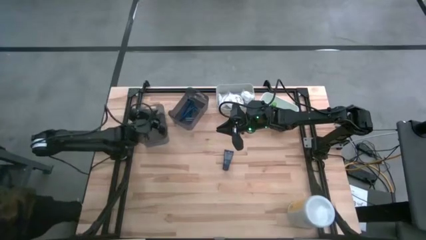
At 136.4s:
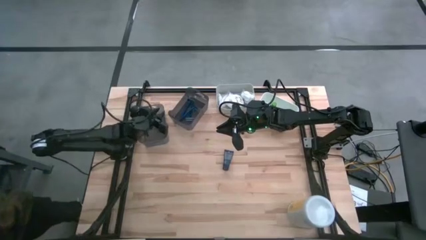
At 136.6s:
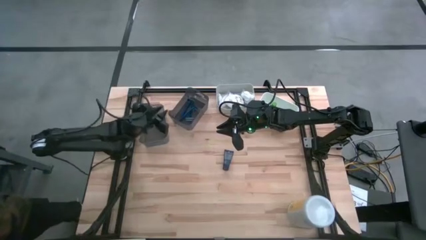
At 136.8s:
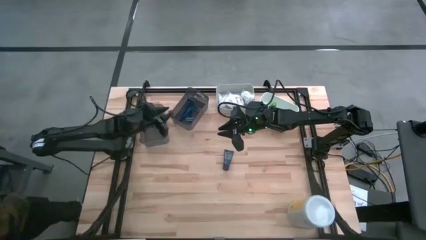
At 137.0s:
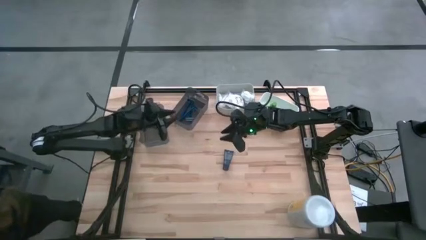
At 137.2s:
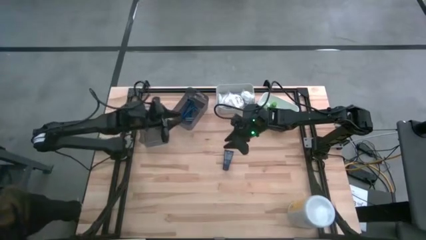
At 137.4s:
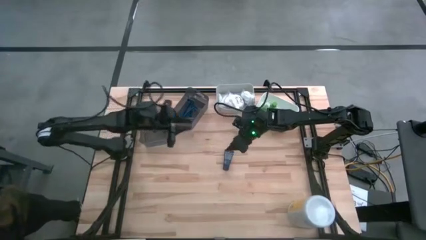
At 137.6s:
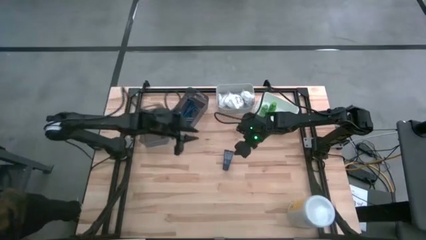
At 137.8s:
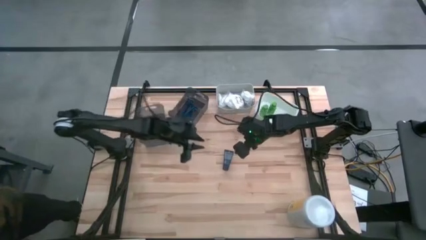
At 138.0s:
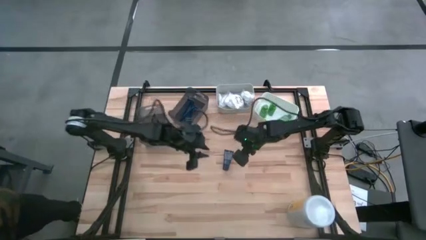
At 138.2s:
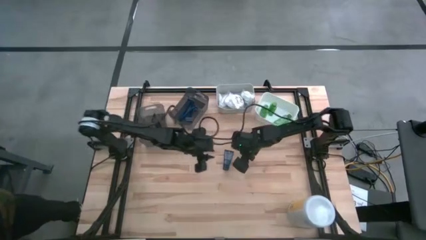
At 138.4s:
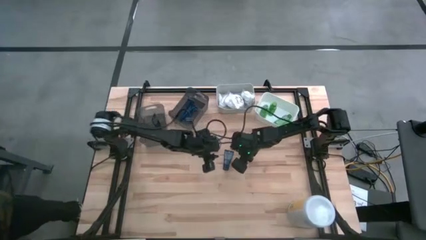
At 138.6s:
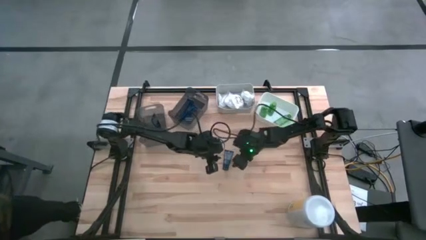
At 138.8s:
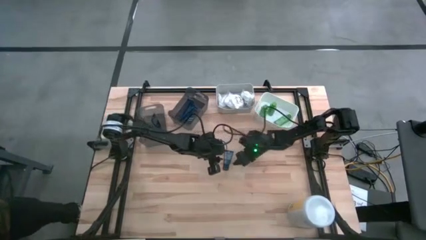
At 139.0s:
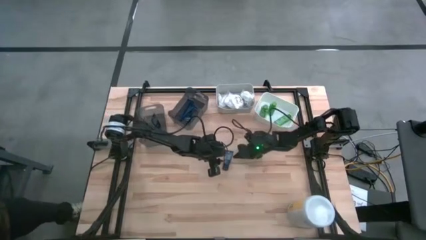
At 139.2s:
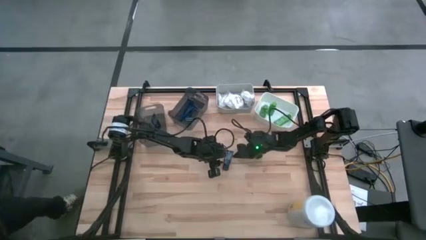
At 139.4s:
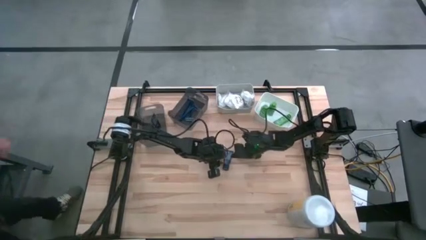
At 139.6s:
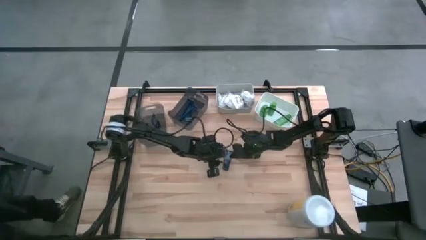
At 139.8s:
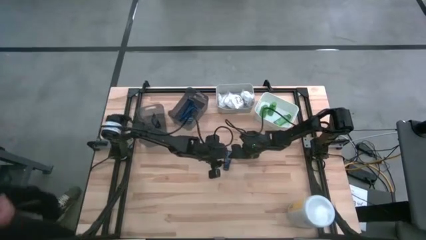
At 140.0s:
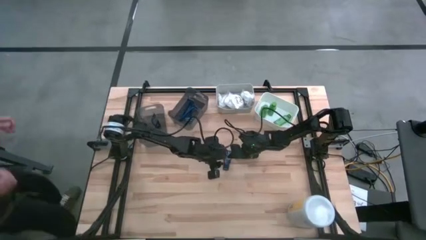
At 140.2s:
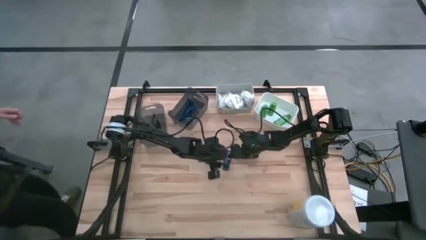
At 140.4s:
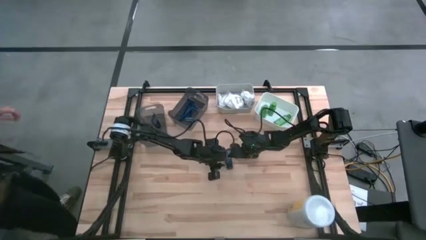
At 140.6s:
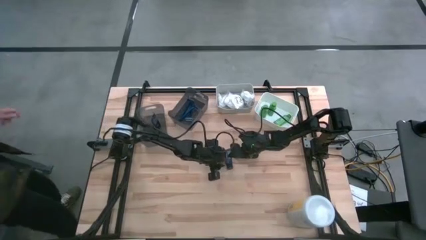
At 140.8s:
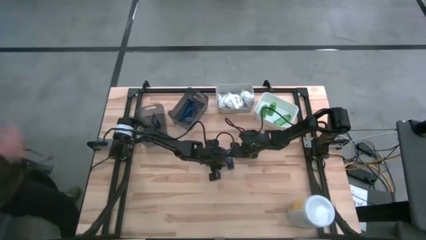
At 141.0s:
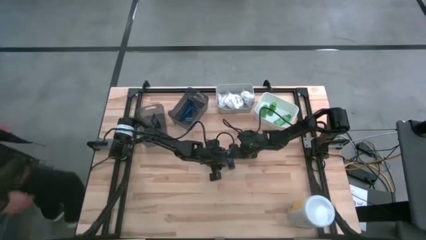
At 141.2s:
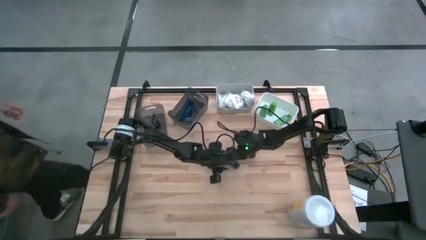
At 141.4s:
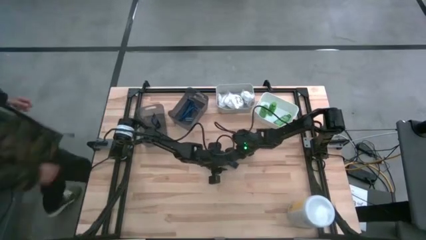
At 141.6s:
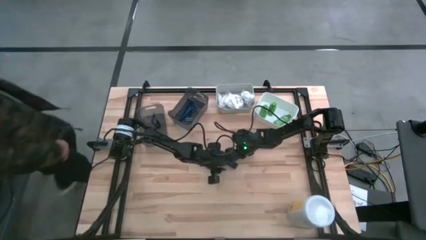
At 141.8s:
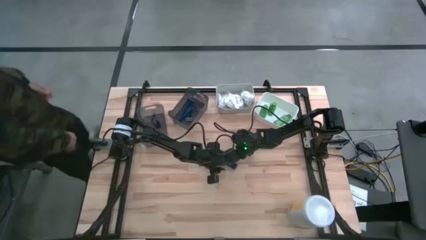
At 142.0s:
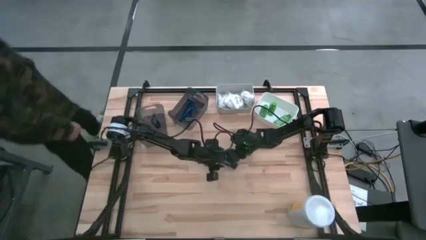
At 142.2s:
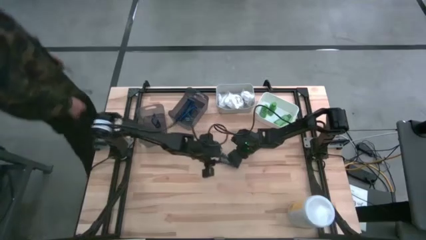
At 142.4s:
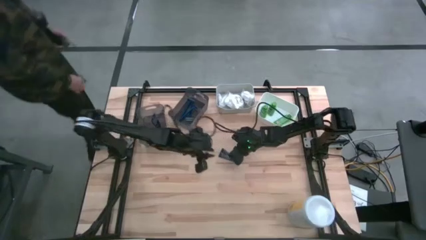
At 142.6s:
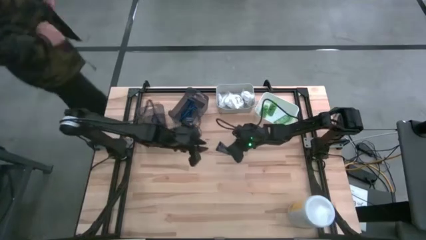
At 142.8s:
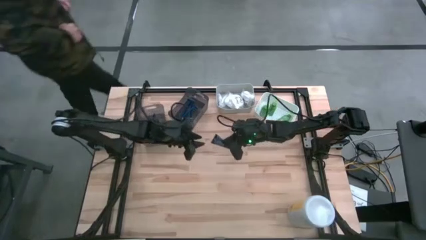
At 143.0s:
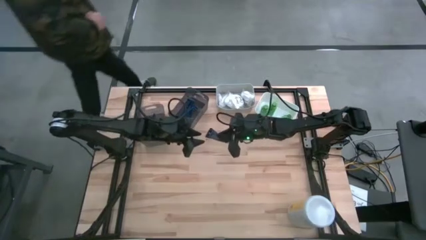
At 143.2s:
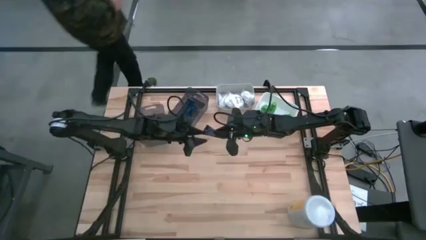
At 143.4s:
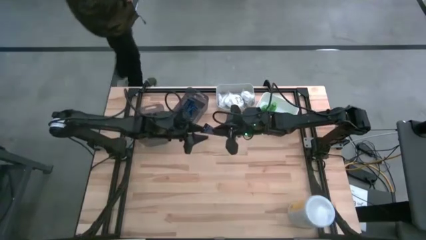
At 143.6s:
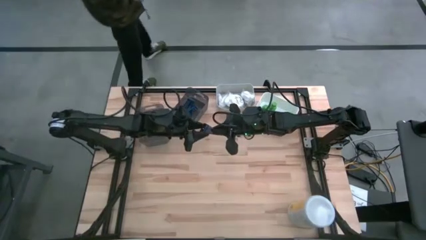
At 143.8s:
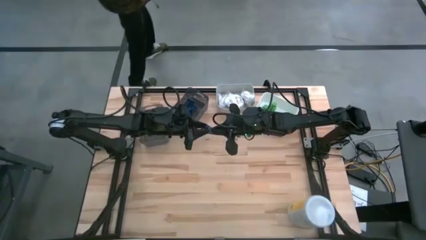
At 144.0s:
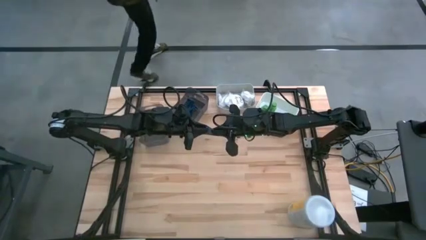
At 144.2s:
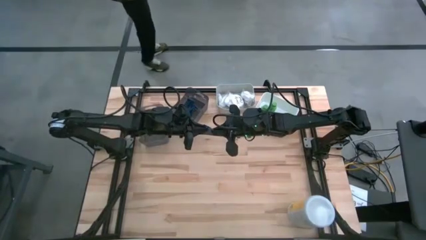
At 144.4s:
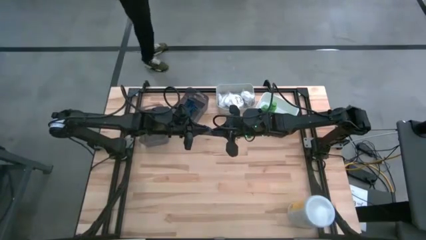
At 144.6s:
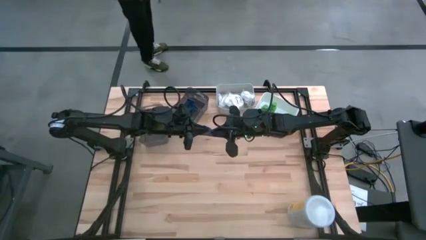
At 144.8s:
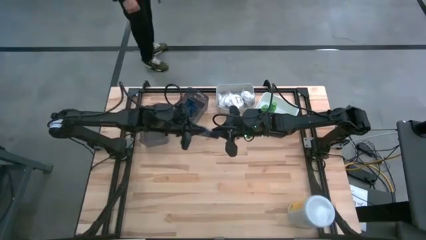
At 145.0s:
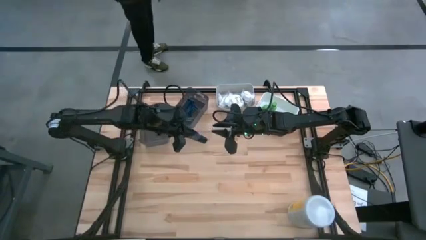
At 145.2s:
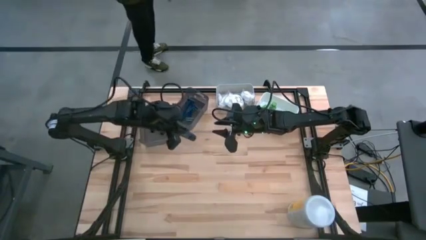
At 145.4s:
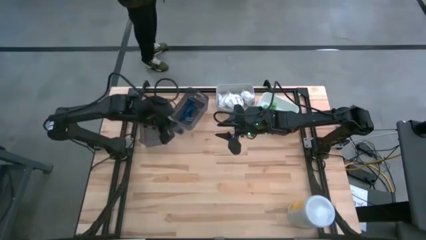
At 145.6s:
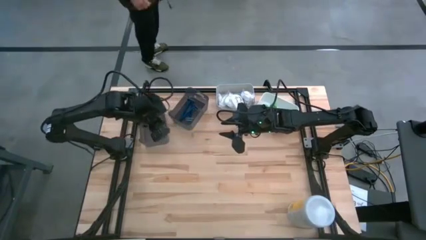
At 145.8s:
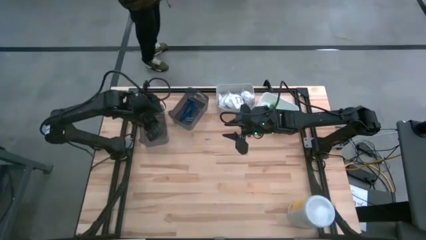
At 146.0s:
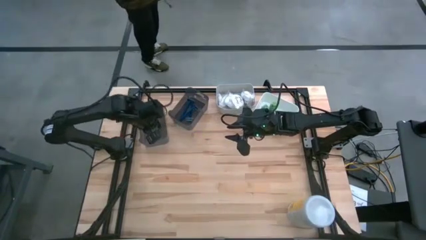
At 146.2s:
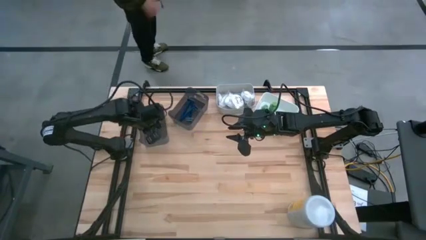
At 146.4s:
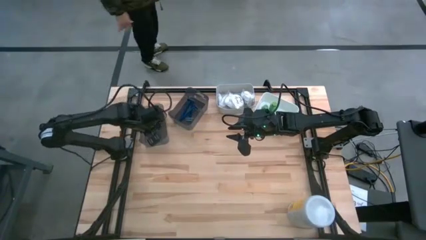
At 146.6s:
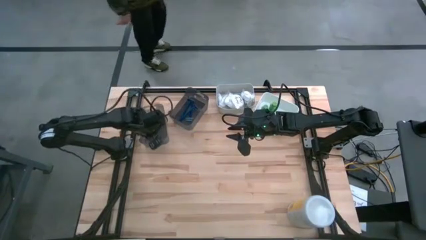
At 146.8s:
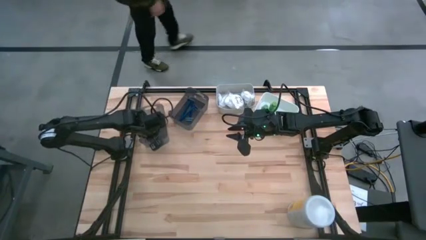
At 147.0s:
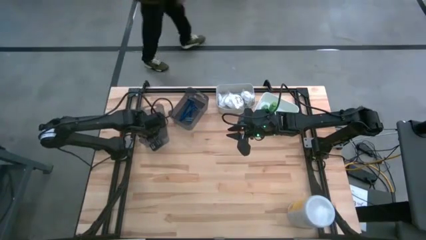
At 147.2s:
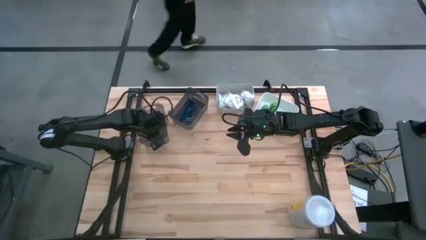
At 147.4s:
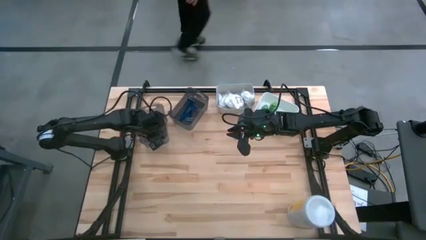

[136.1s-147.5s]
Task: Pick & Place Travel size toiletries
Put the shaving cream into the left black bin

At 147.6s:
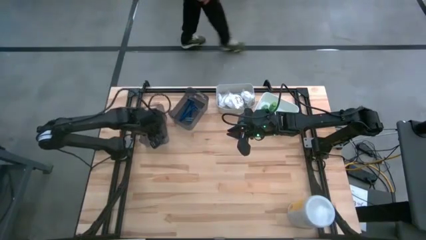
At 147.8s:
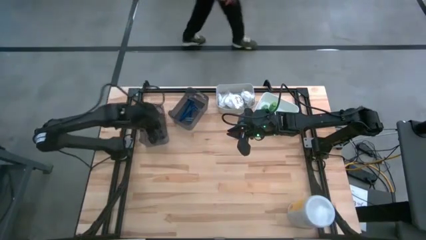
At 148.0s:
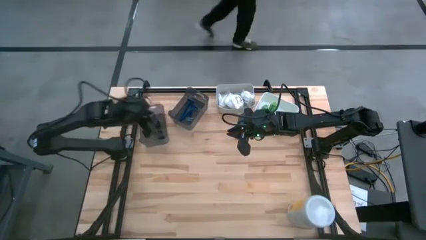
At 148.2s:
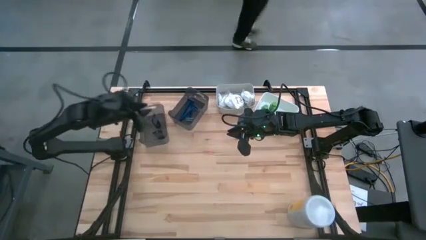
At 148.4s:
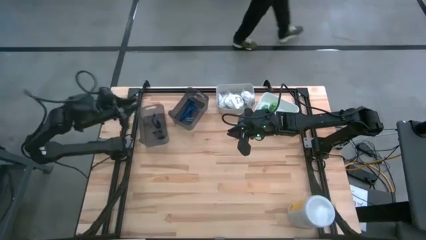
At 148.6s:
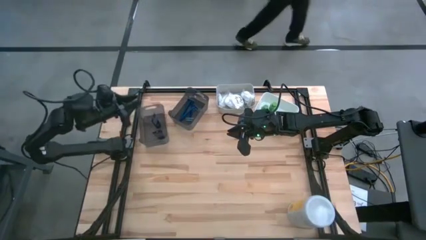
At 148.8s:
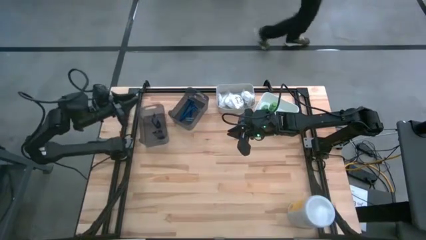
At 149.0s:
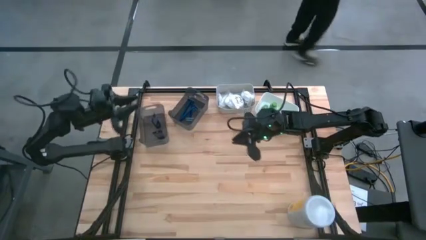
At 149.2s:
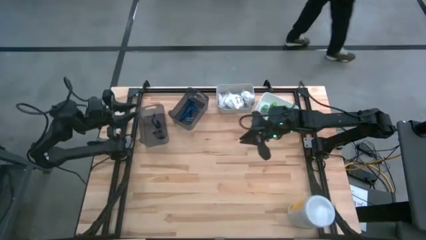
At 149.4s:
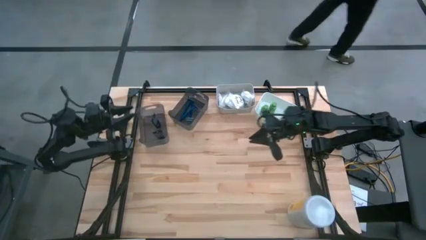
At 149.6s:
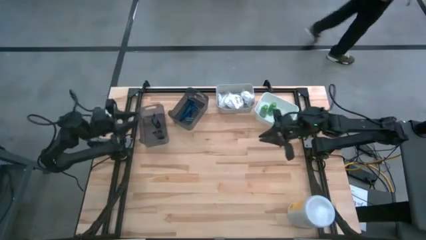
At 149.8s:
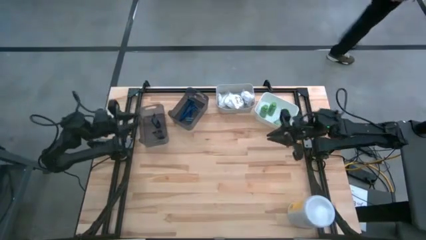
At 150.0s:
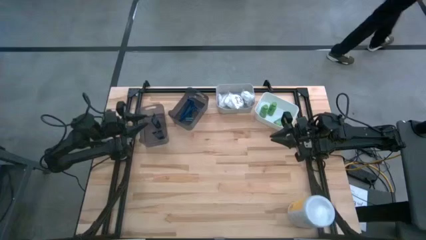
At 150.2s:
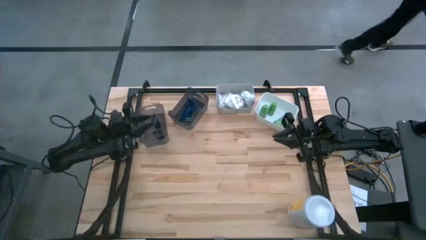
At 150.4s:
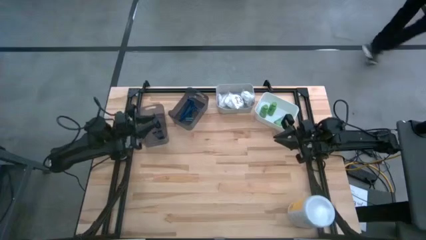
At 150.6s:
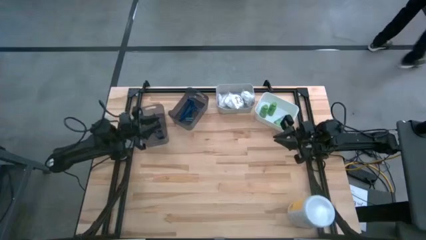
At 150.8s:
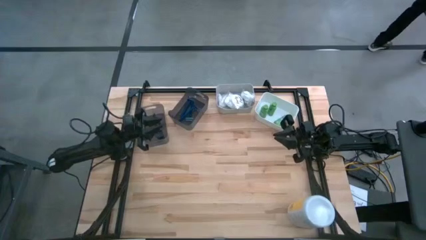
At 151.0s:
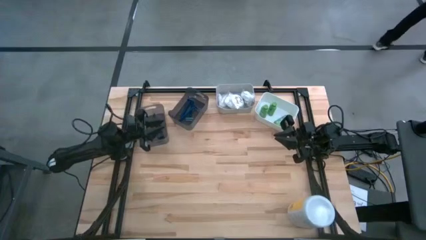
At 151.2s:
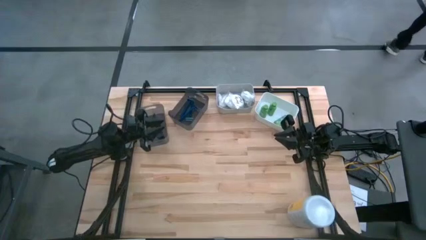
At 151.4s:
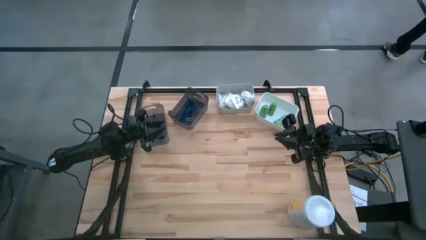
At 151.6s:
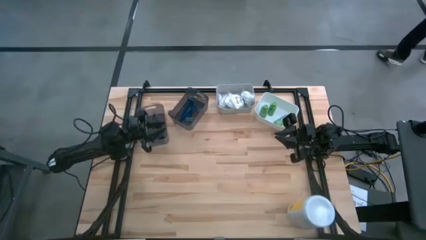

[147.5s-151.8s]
Return to Home Position
